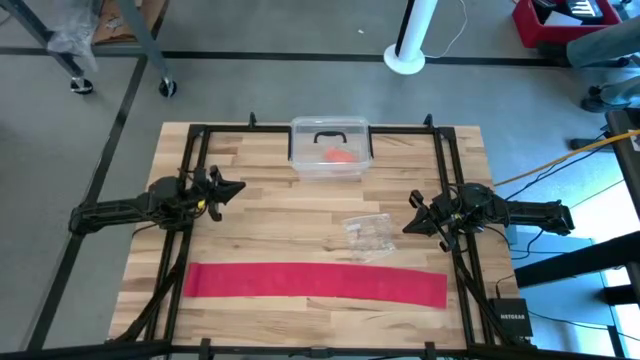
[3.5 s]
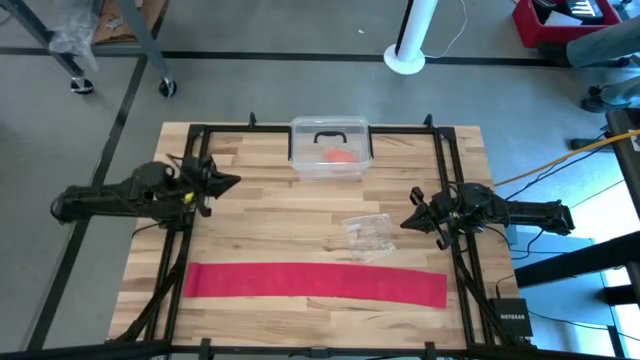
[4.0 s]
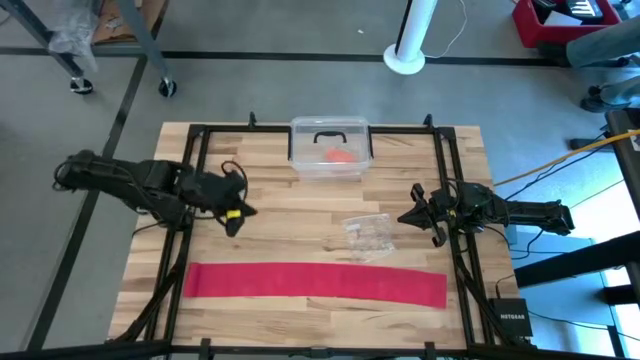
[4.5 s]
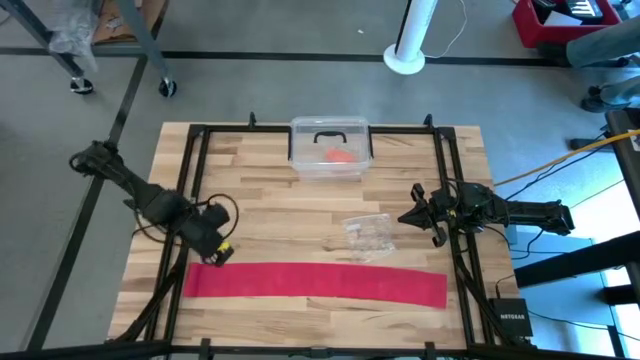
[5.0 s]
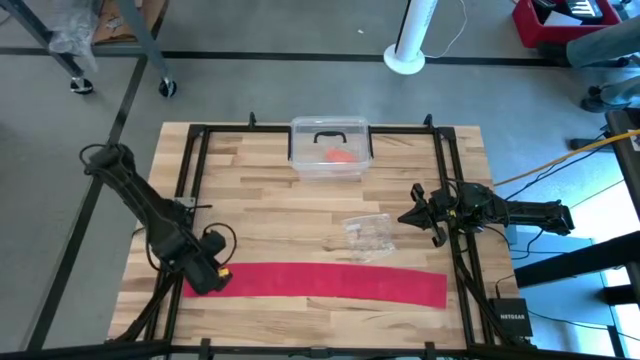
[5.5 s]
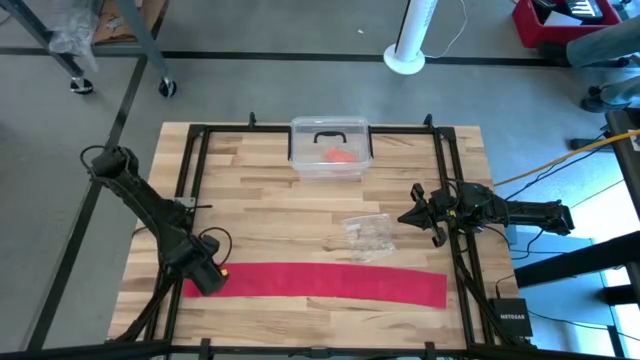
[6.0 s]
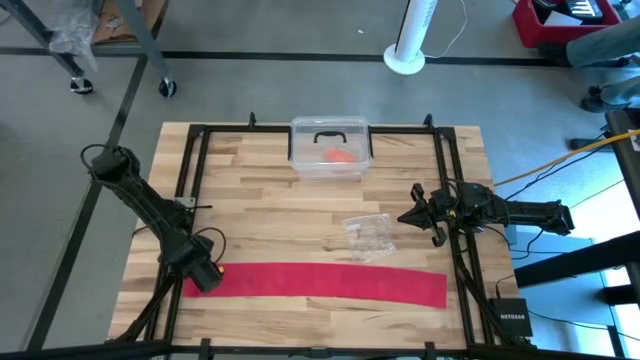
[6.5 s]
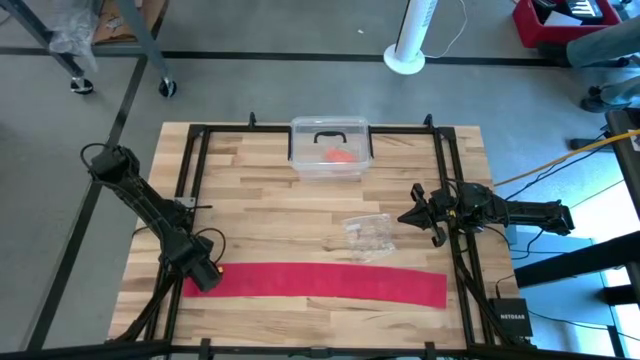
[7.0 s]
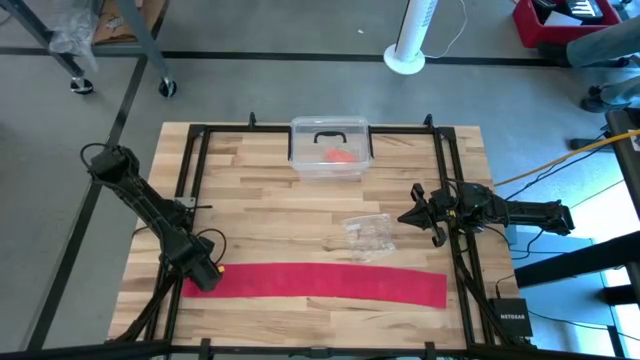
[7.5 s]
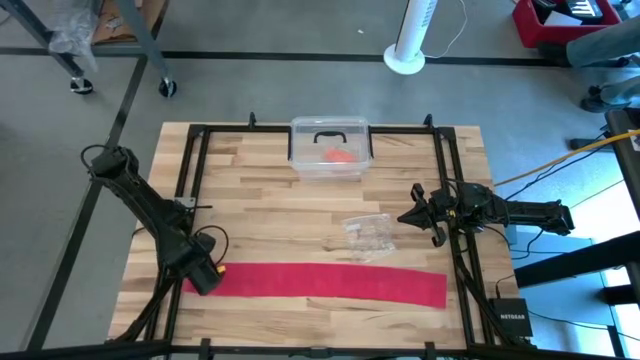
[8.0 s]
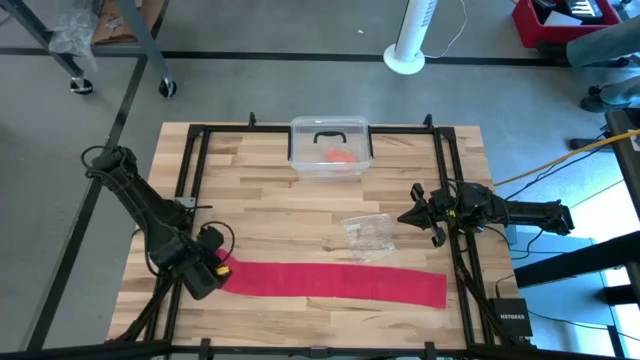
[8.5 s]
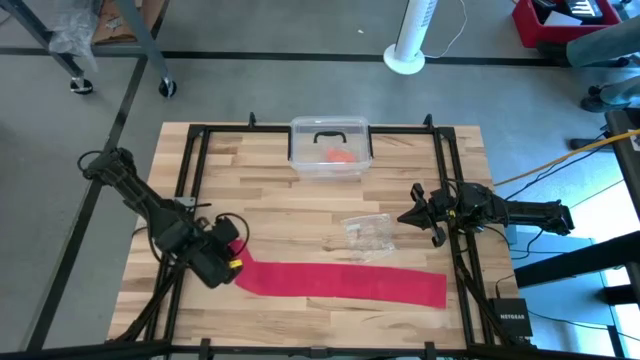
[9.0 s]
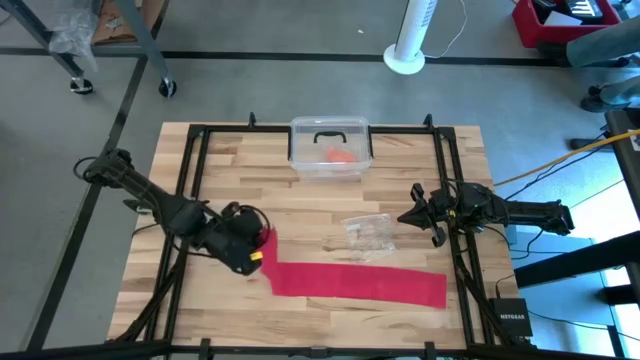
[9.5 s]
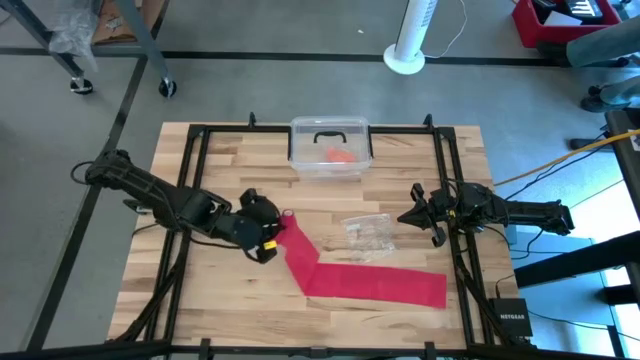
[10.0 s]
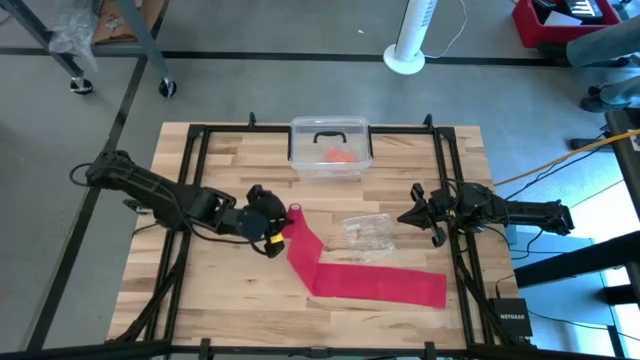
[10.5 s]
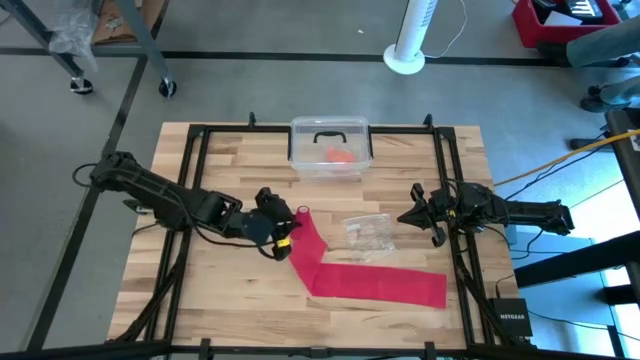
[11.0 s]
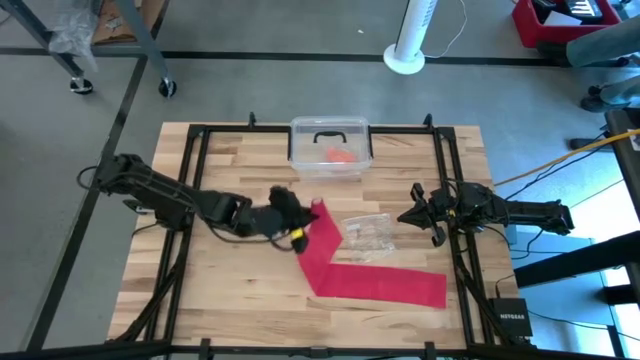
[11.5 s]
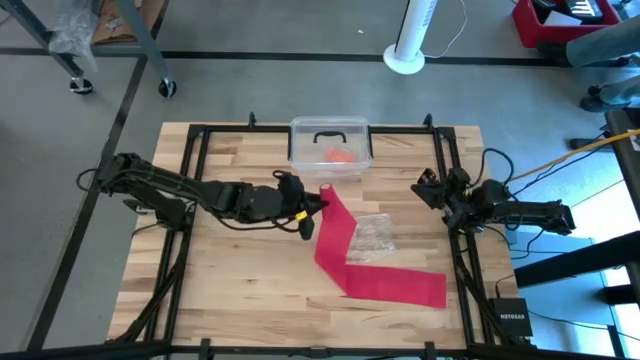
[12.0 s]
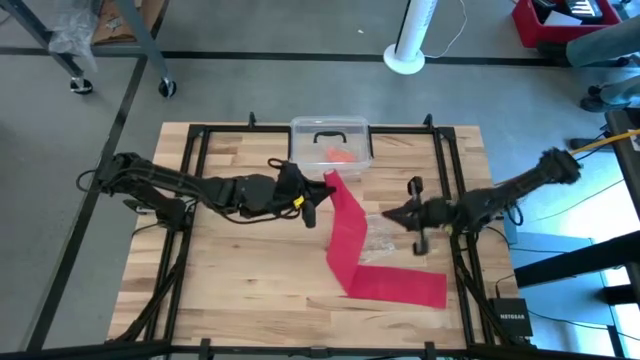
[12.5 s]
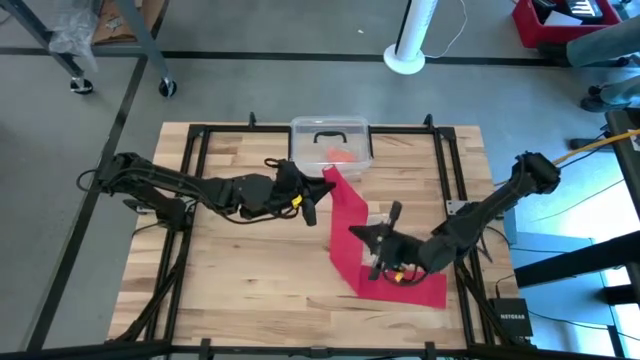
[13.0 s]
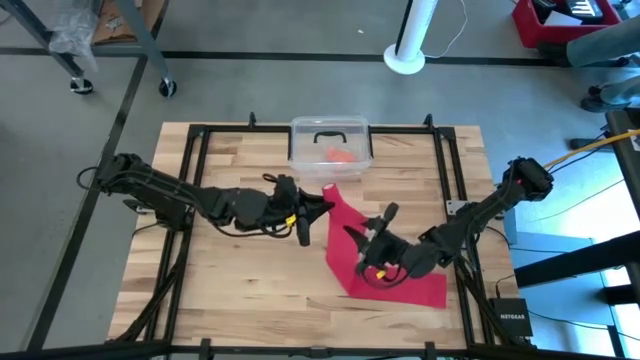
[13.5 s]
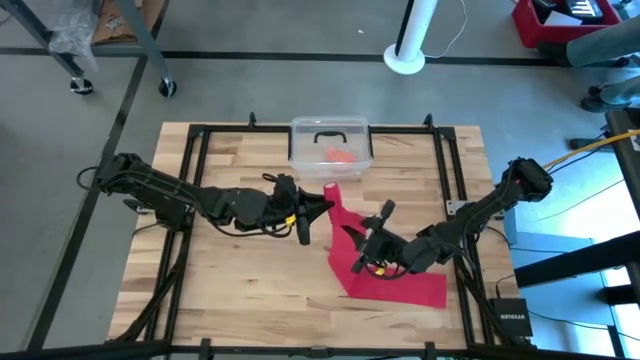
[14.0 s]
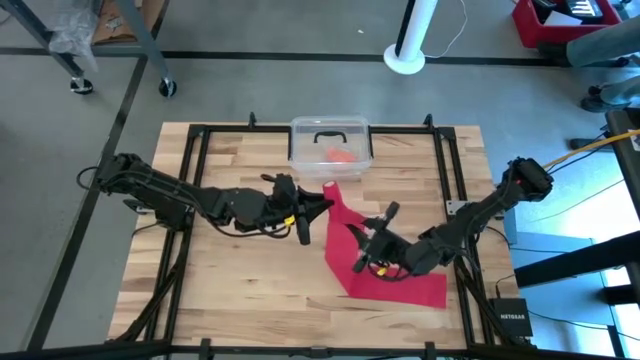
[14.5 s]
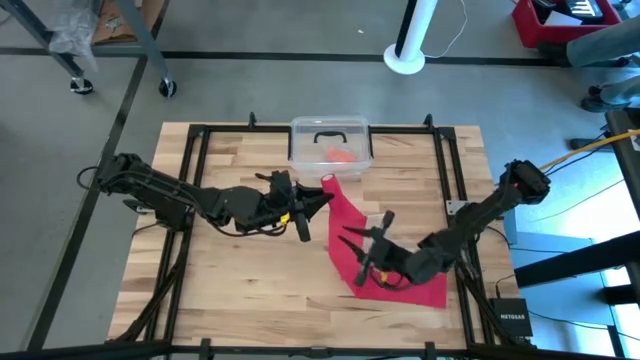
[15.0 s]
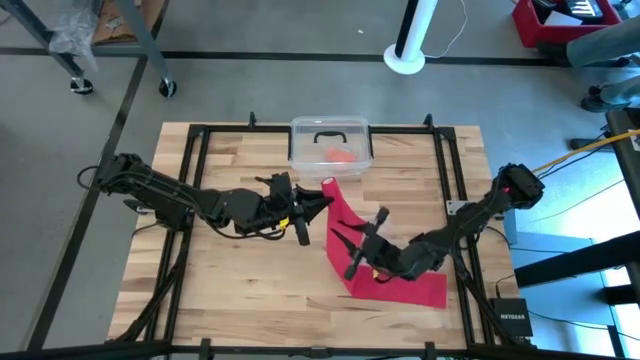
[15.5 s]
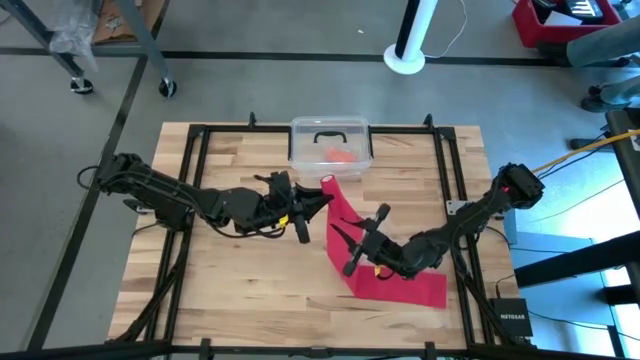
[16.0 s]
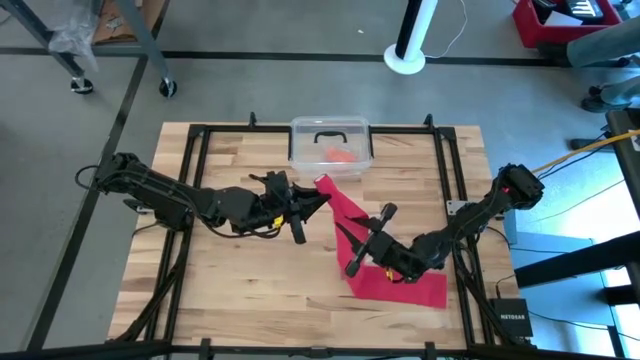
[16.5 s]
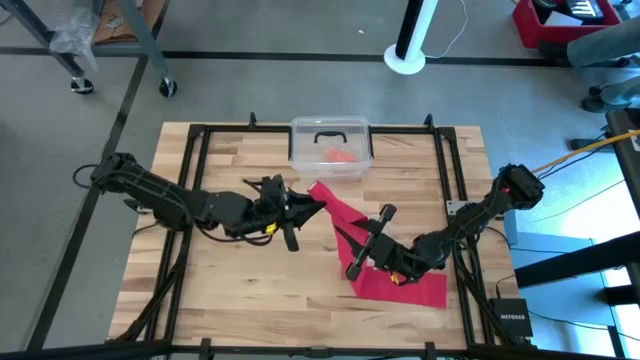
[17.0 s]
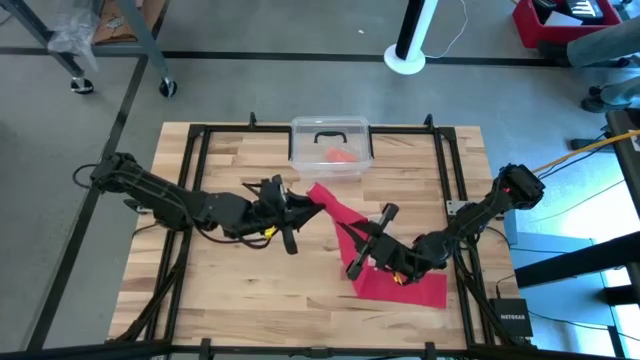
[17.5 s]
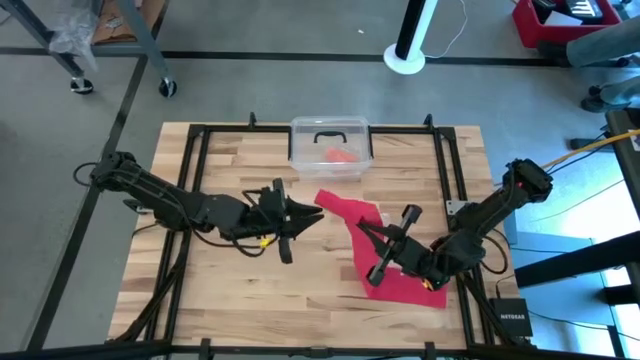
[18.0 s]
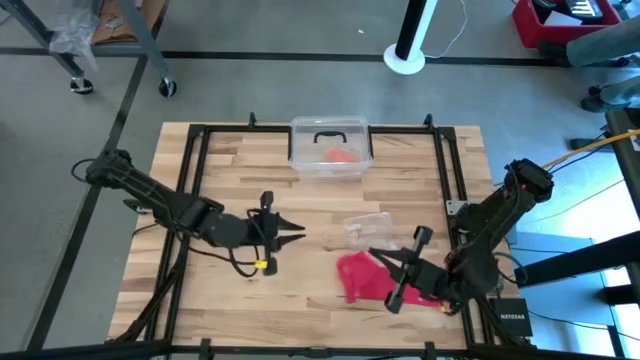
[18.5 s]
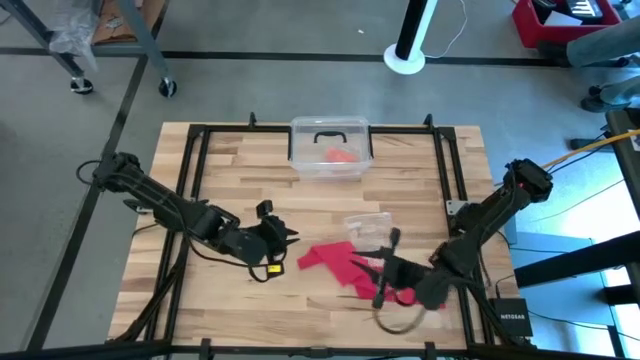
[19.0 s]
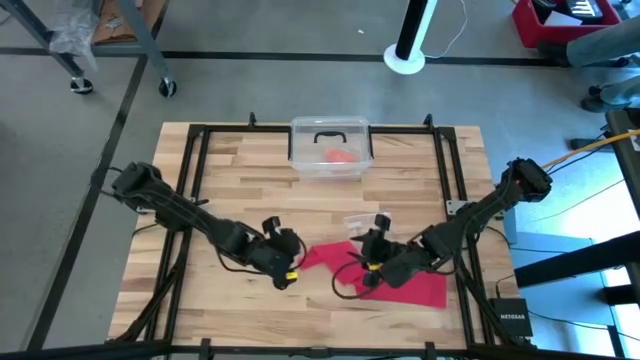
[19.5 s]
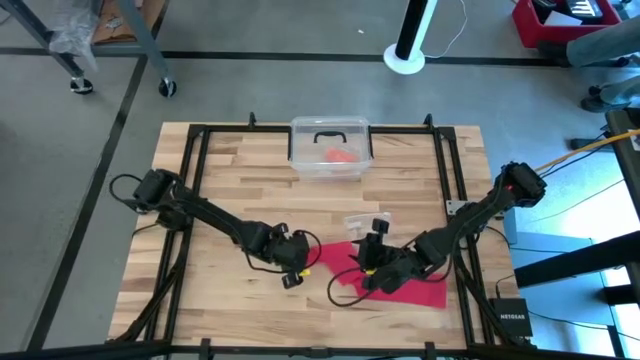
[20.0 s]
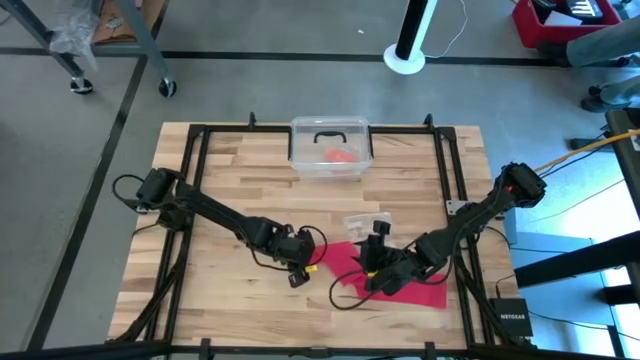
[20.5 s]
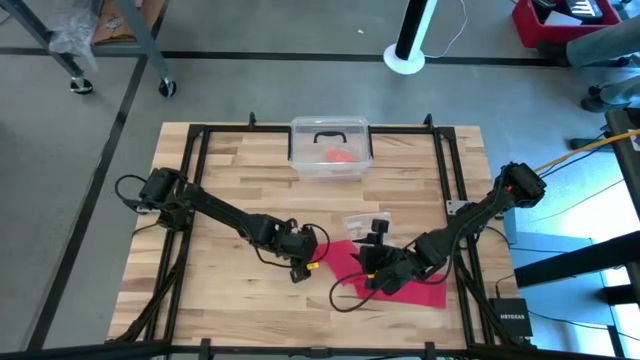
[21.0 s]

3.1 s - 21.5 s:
Task: Roll bandage
Roll the red bandage
